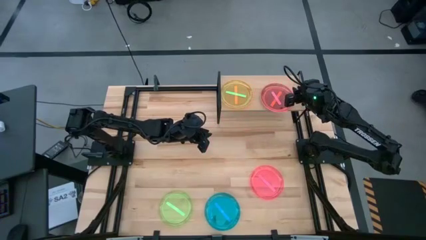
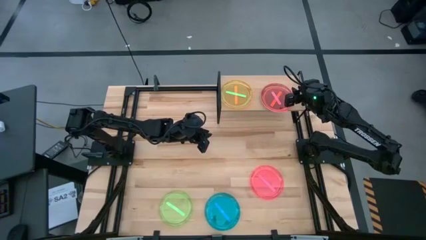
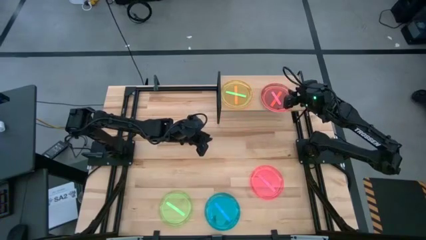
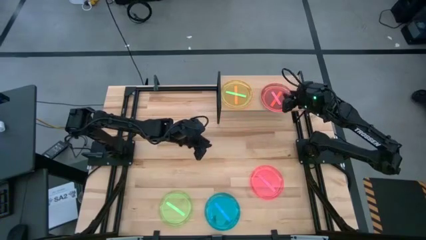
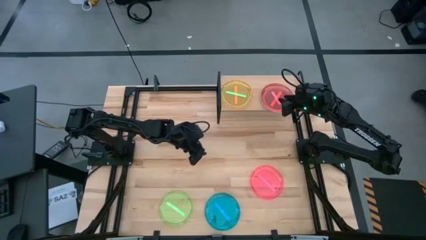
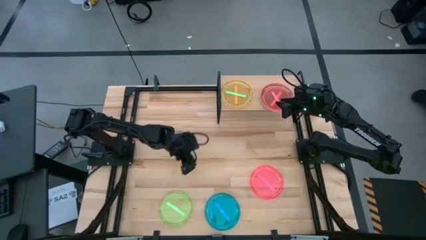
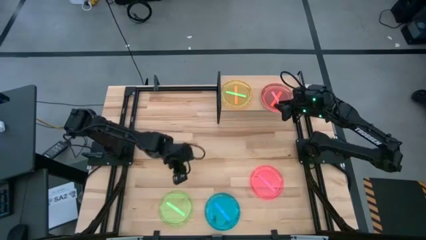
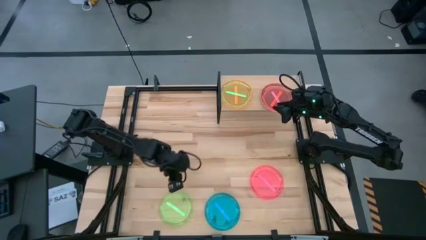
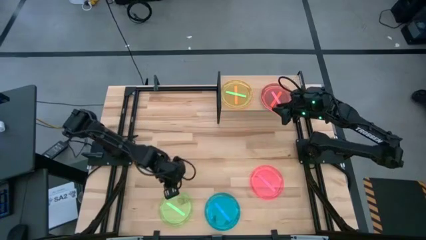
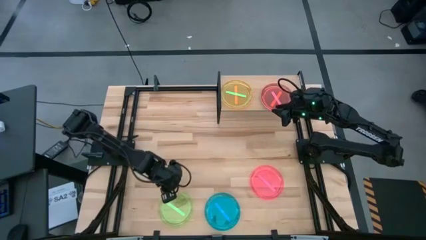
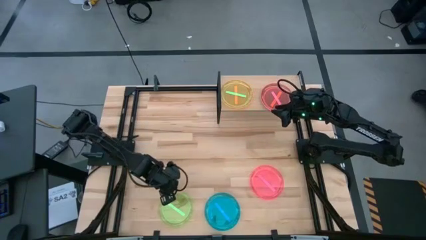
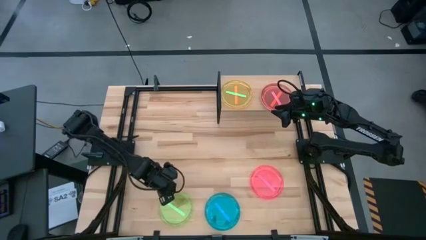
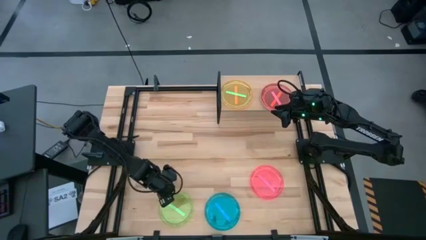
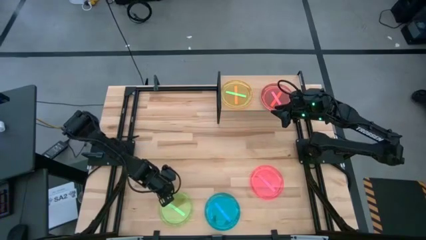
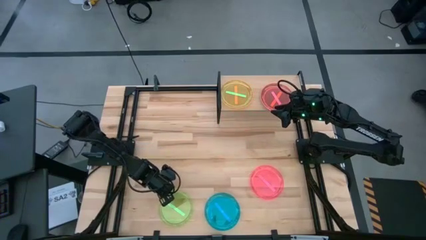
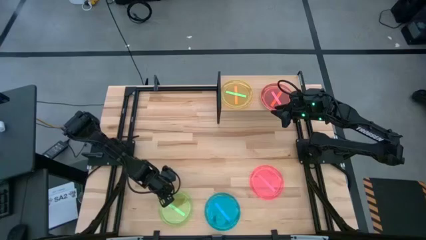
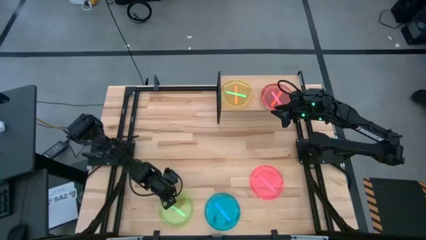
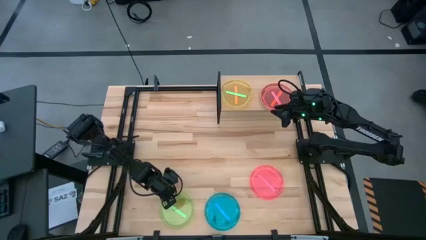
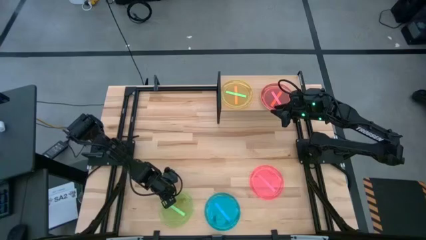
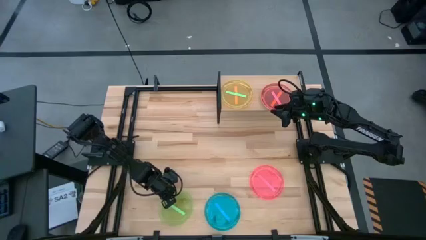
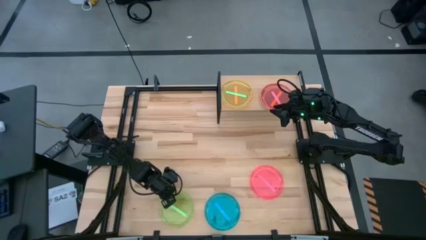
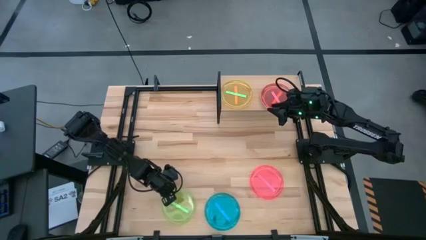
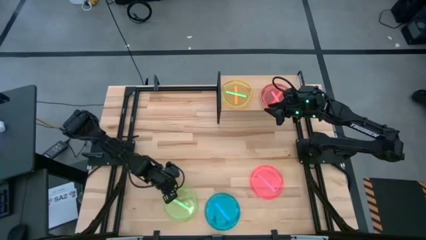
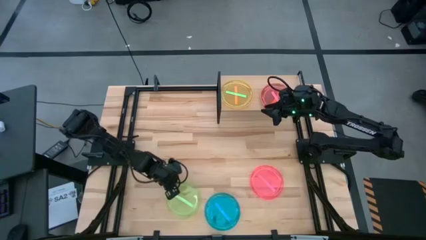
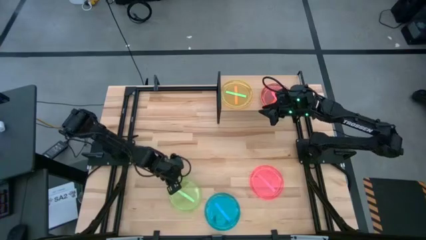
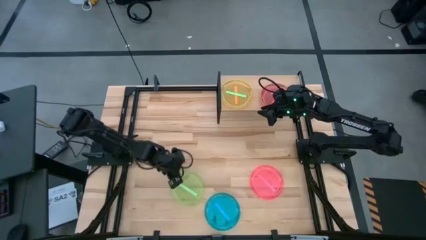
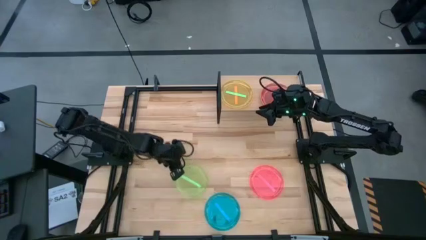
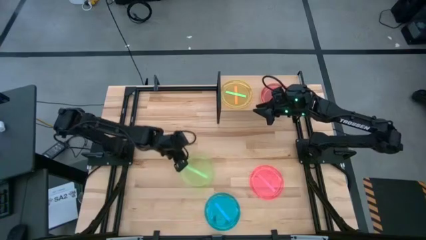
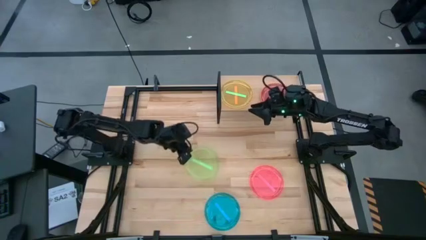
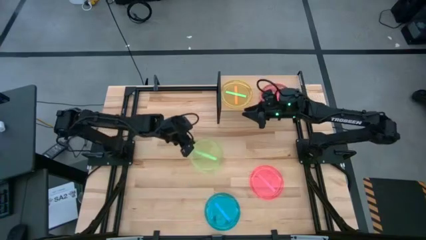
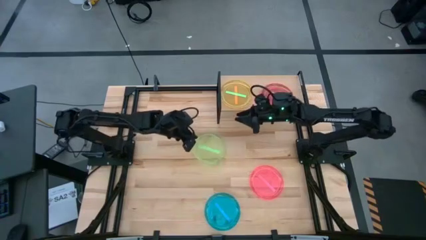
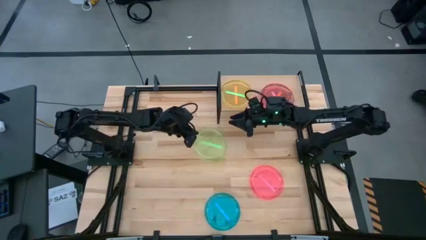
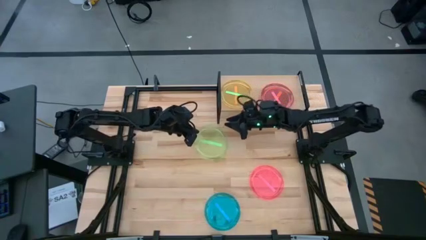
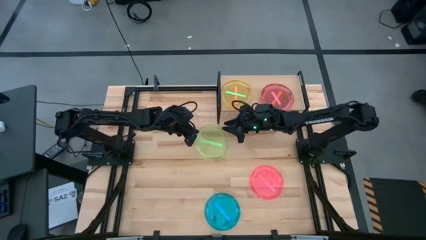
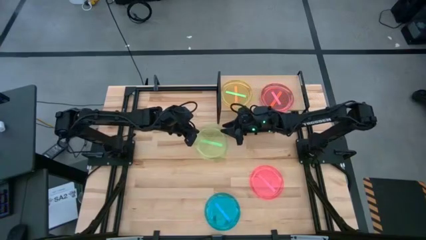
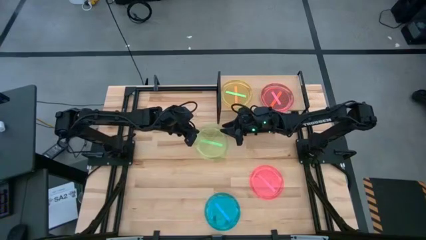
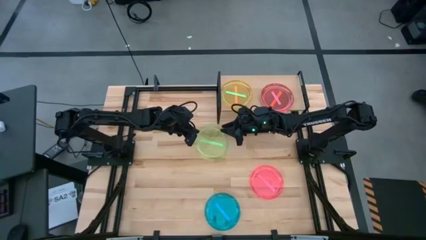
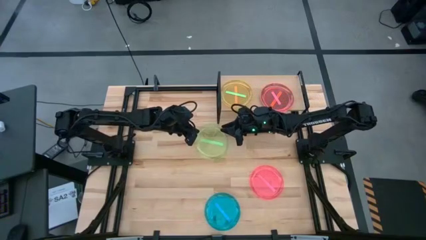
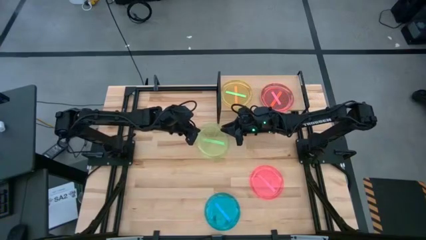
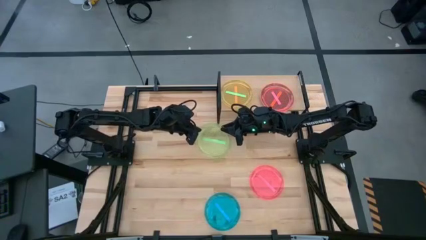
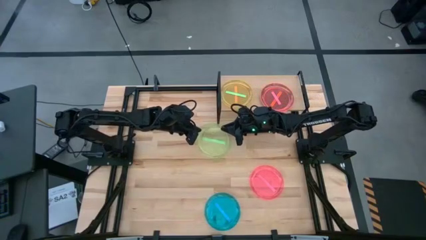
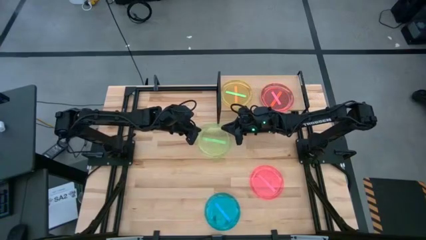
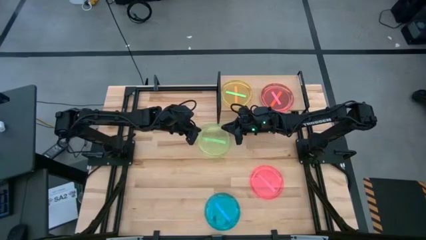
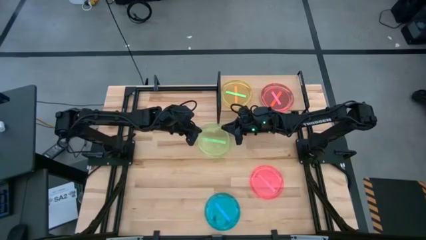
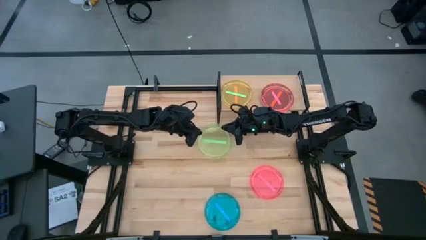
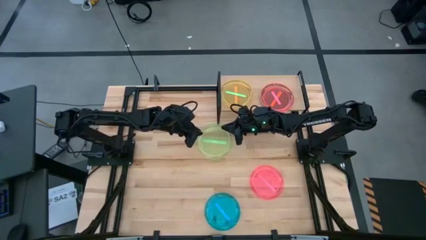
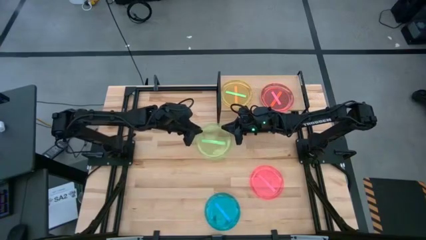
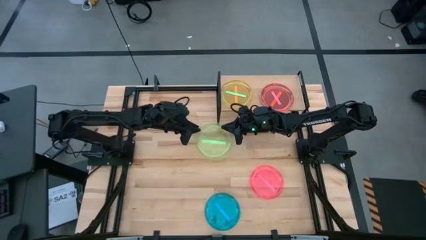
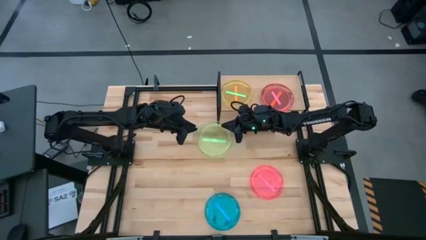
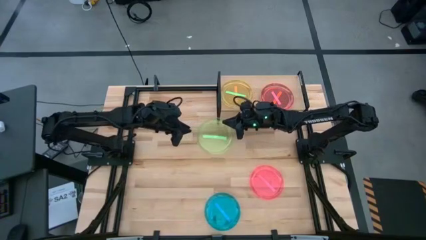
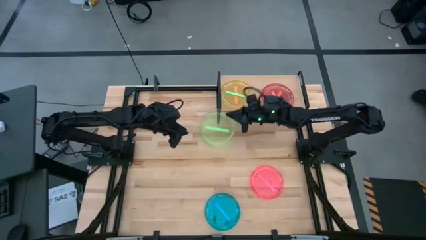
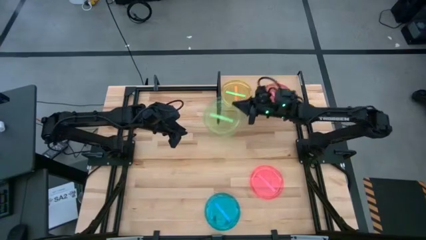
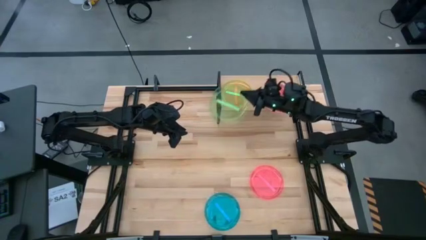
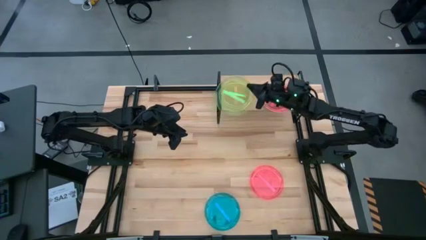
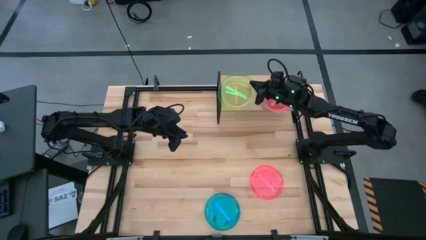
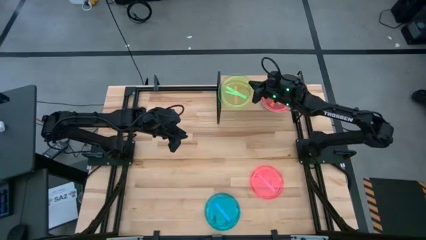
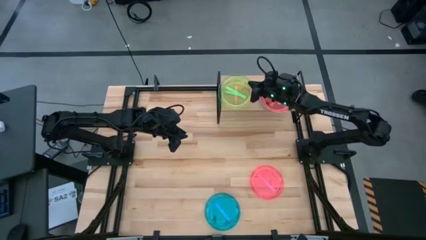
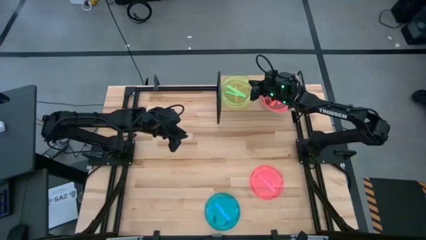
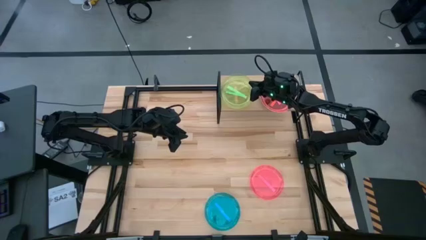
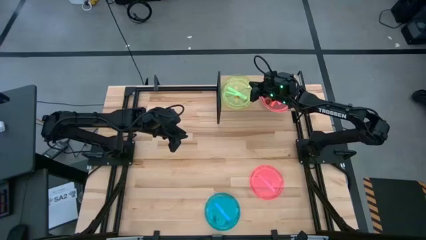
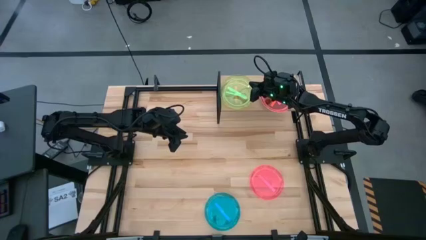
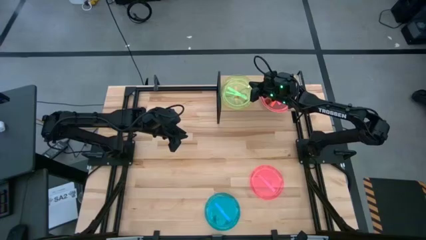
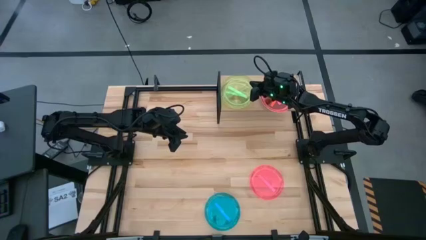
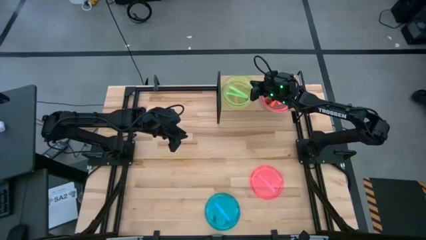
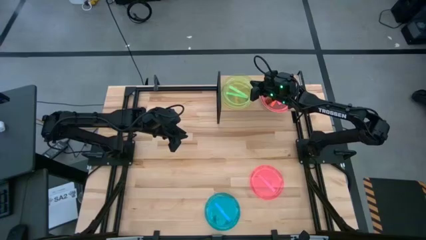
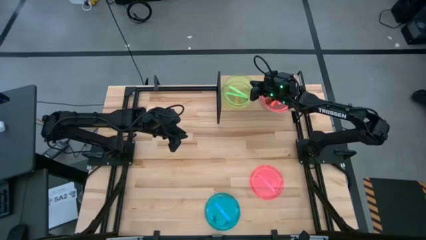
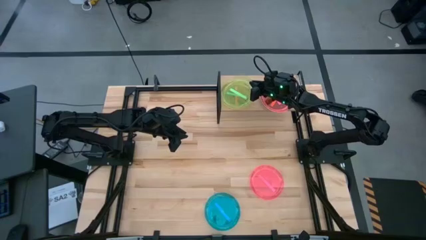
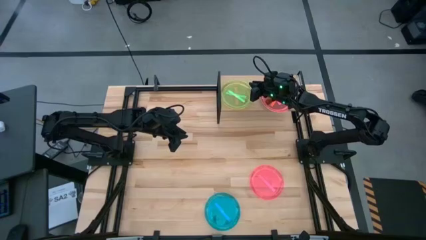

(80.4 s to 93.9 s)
Task: Place and stack plates onto a shelf
Stack the green plate on top of the orange plate on the shelf

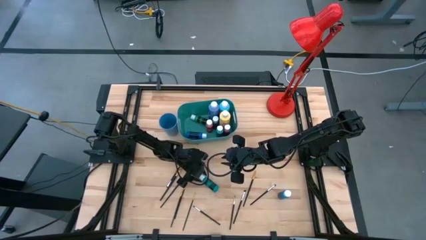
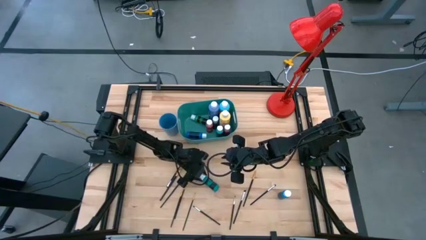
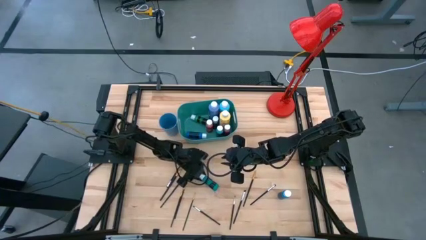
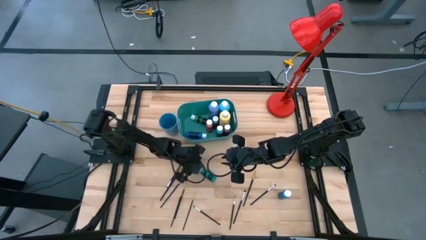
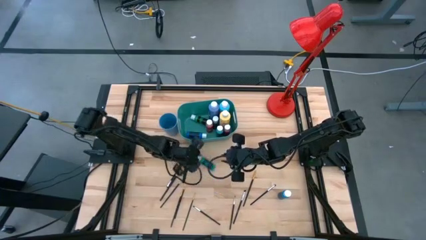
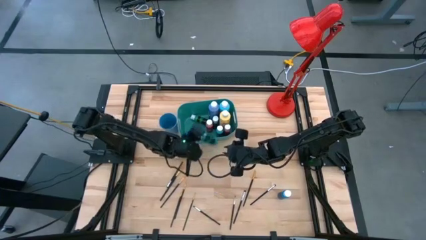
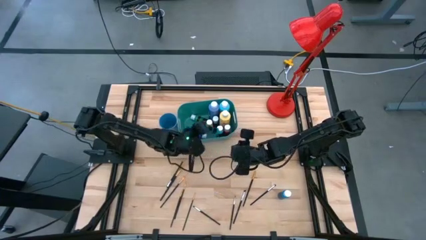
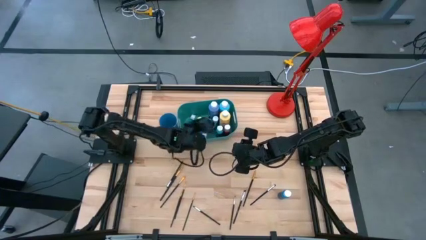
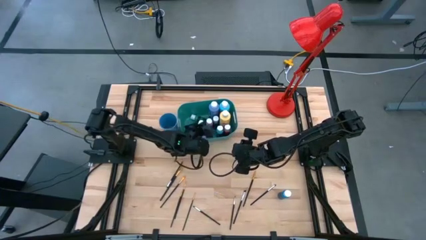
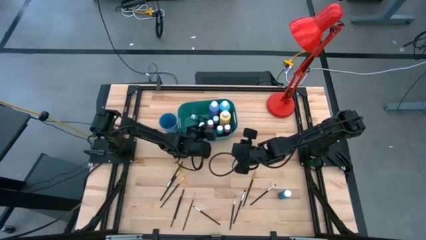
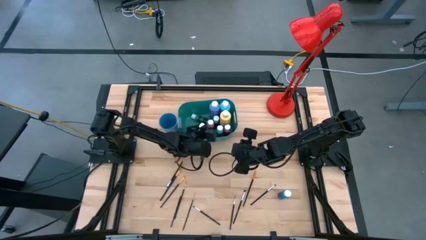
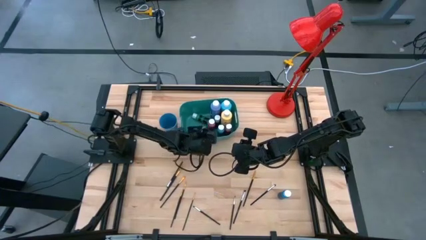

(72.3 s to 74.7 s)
Task: Pick & Place Paint Supplies
Put the small blue green paint bottle into the green bin
